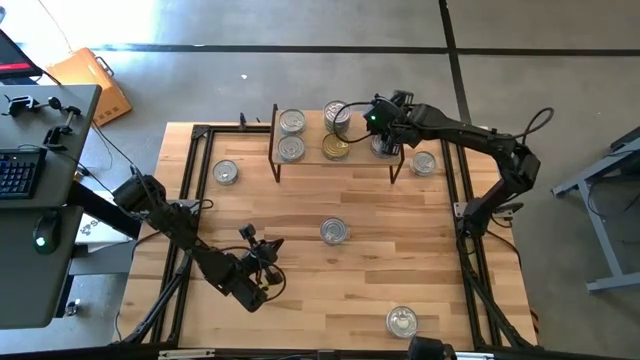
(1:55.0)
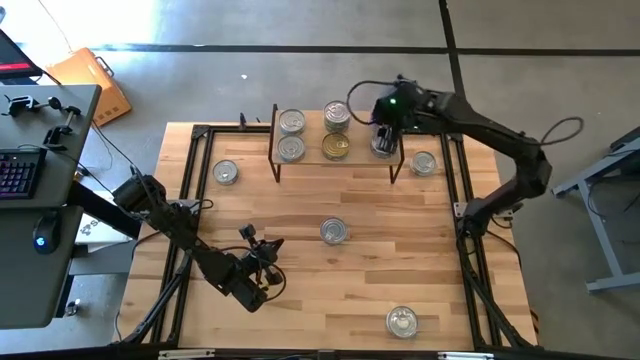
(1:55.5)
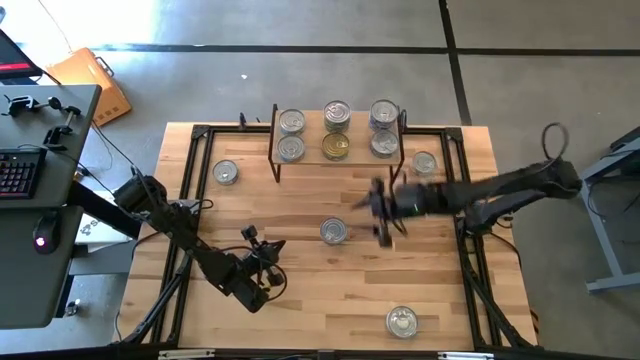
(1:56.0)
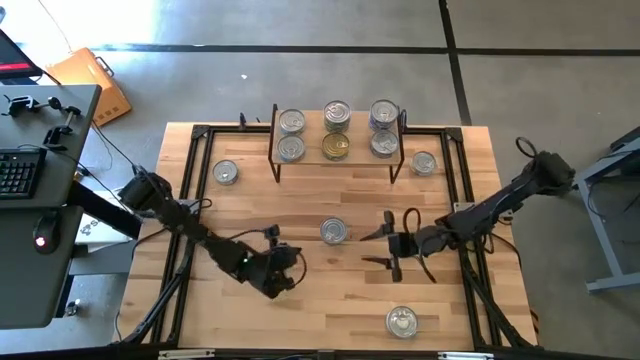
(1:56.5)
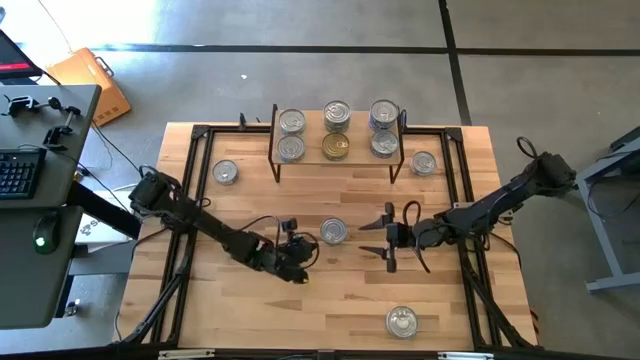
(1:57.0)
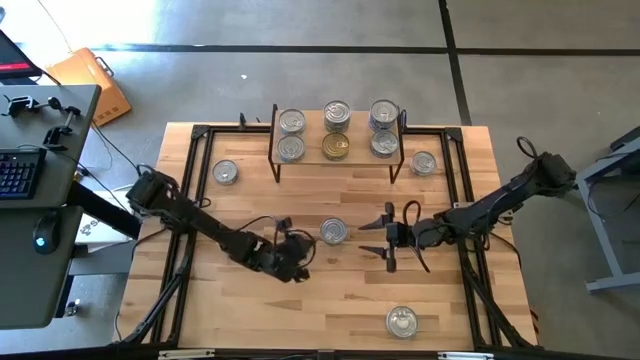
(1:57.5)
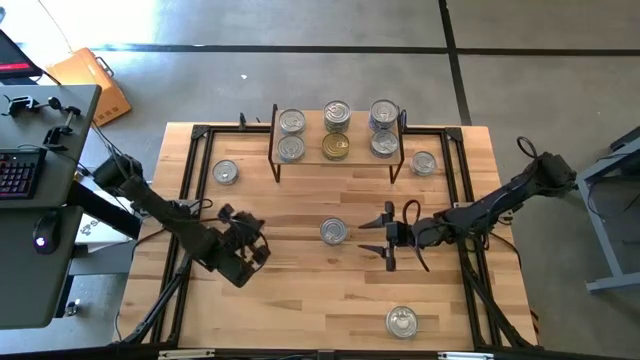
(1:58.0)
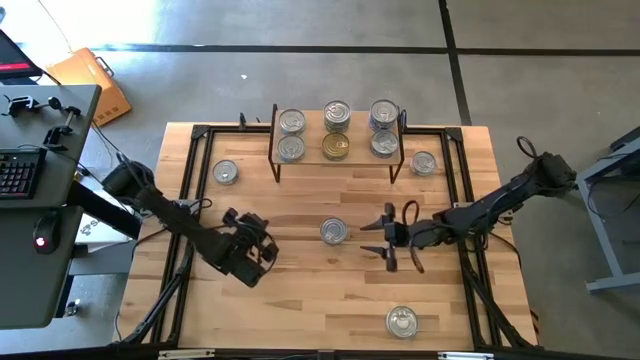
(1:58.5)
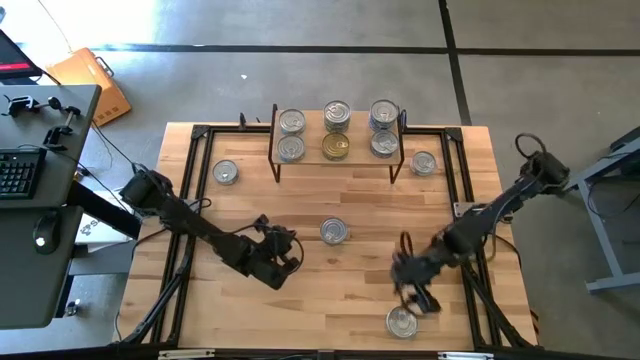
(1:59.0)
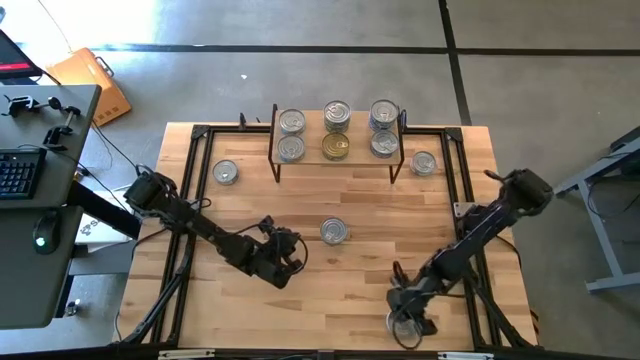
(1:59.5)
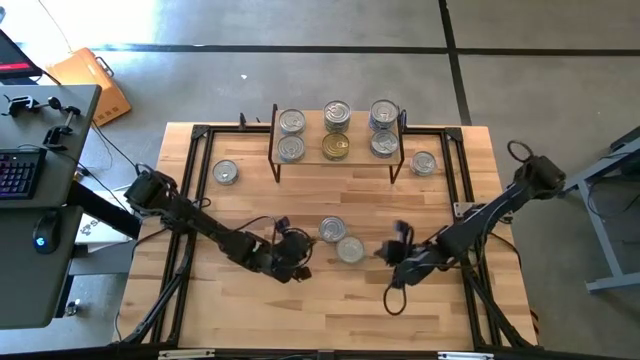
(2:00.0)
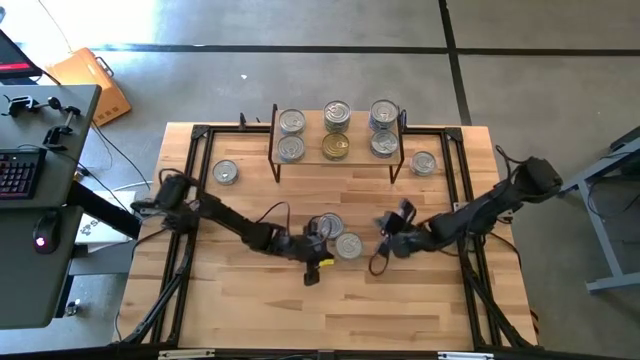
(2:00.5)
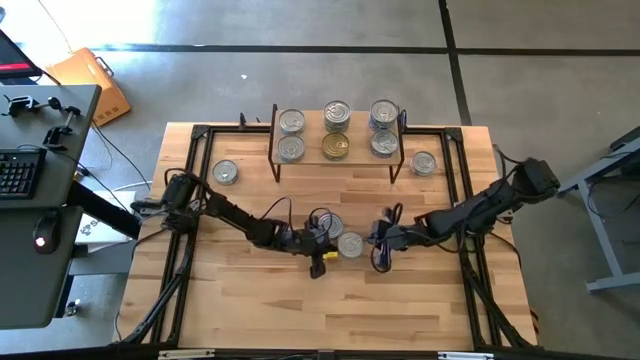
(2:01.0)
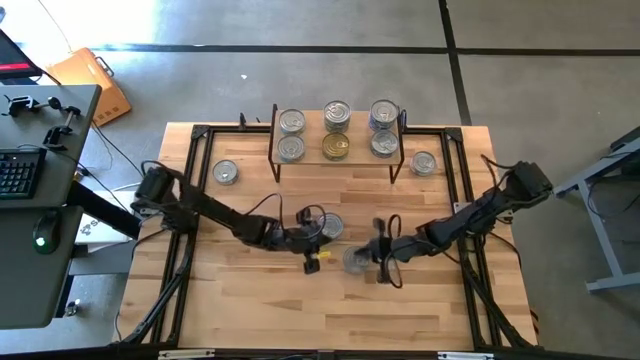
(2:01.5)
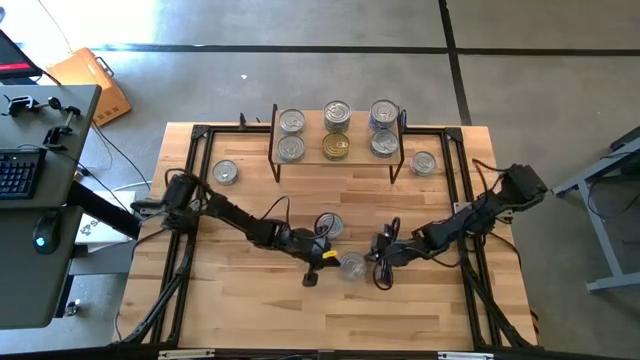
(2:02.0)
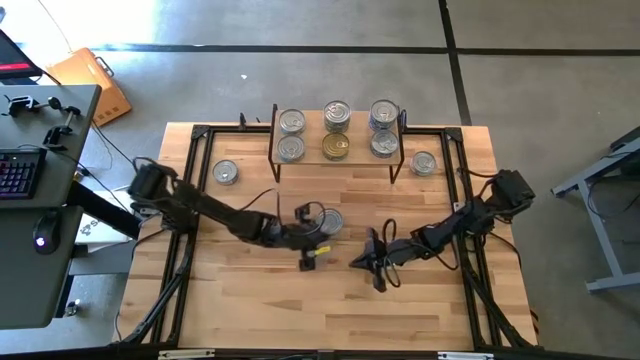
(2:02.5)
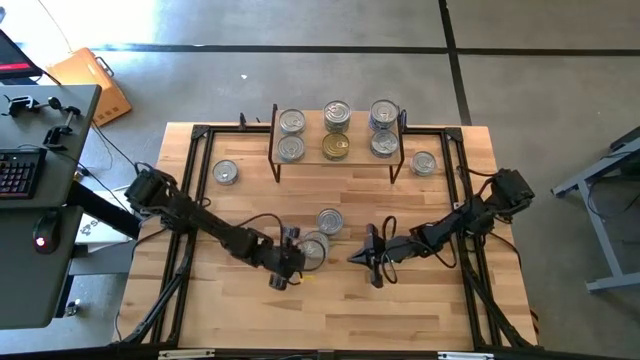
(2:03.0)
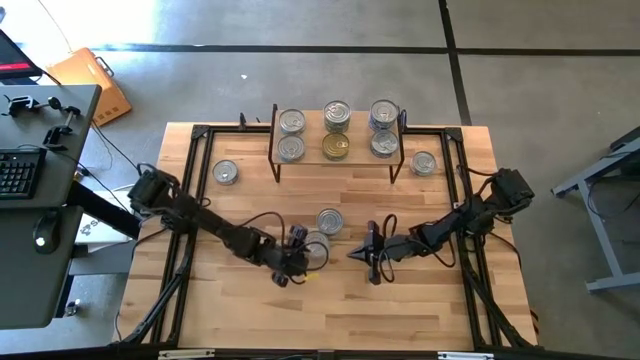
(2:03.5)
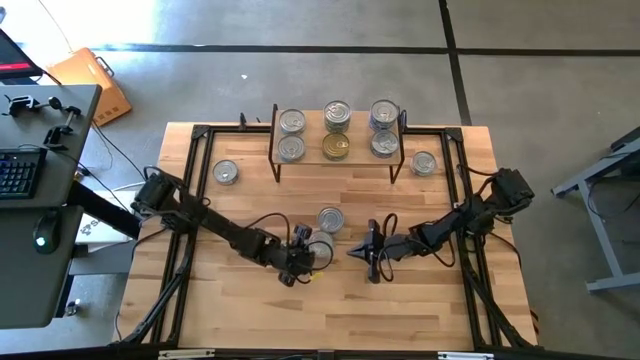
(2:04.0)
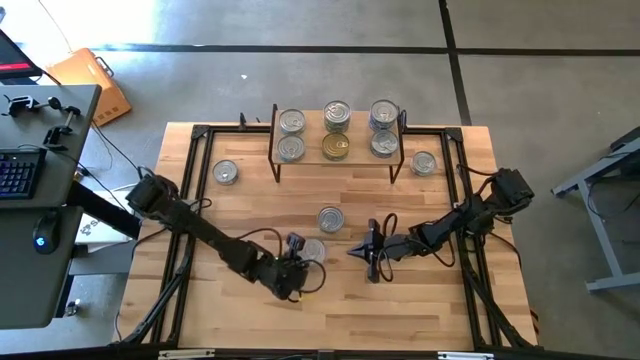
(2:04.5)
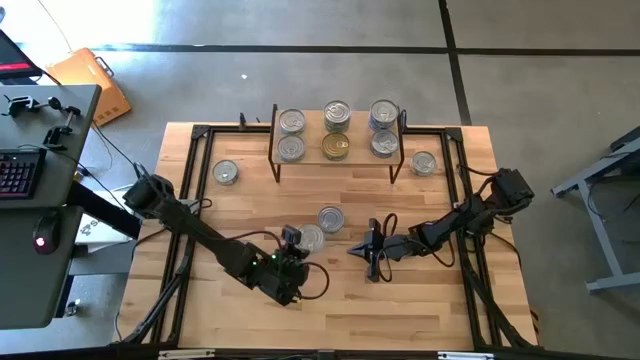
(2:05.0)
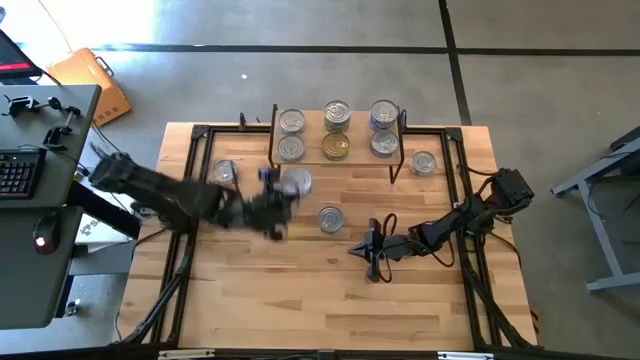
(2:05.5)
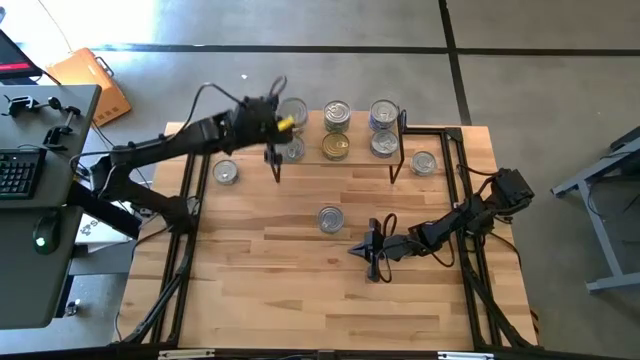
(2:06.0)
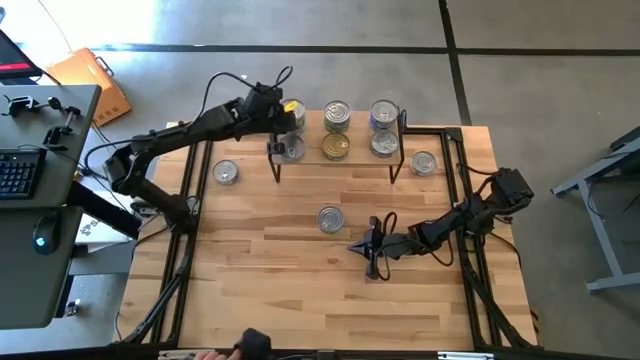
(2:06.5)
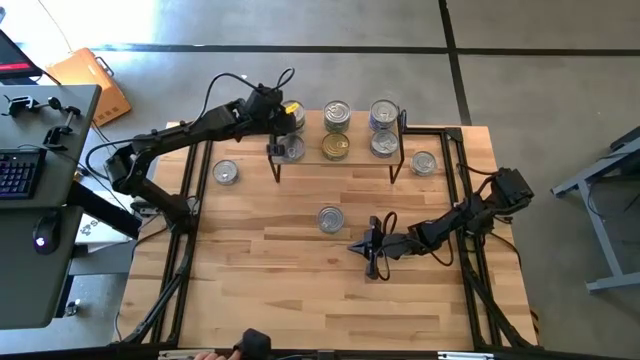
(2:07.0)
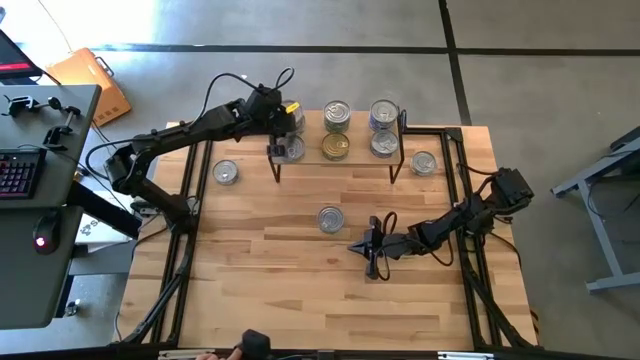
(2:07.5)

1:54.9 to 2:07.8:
Task: Stack canned seafood by type on shelf
Stack the yellow tuna can on top of the other yellow tuna can on the shelf

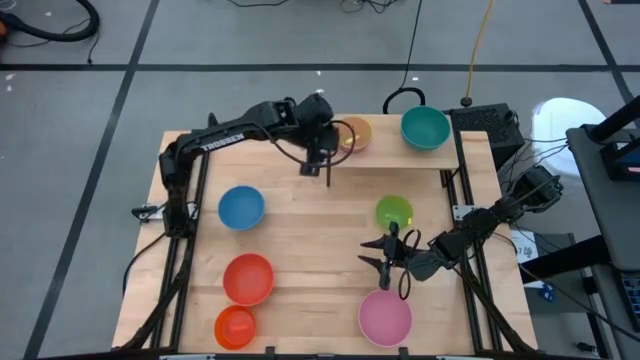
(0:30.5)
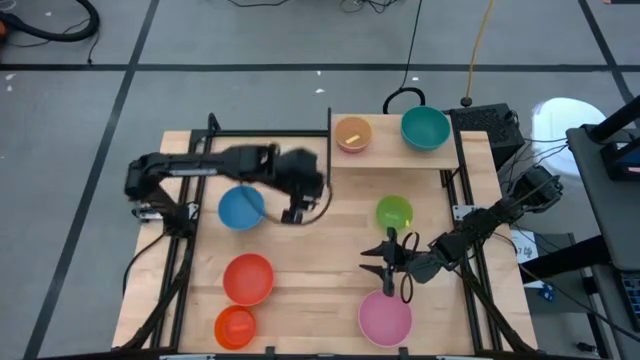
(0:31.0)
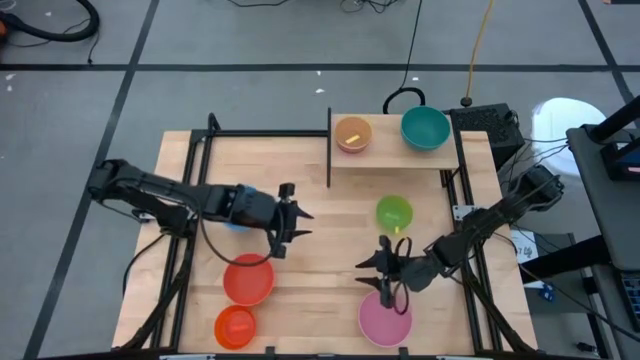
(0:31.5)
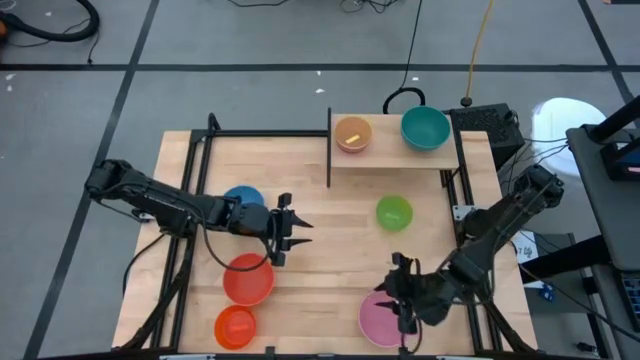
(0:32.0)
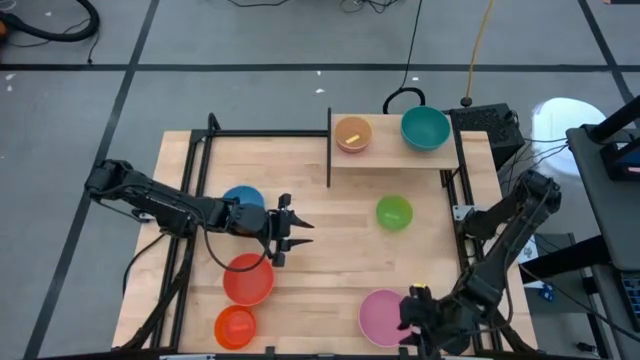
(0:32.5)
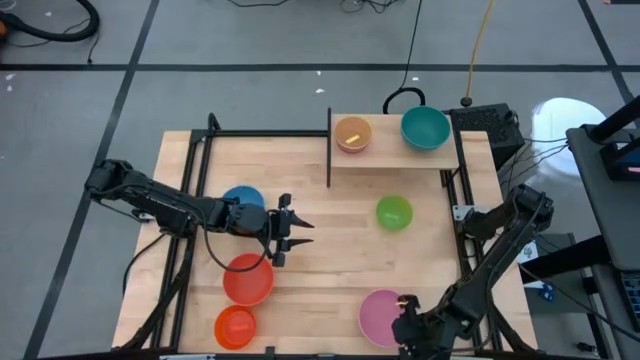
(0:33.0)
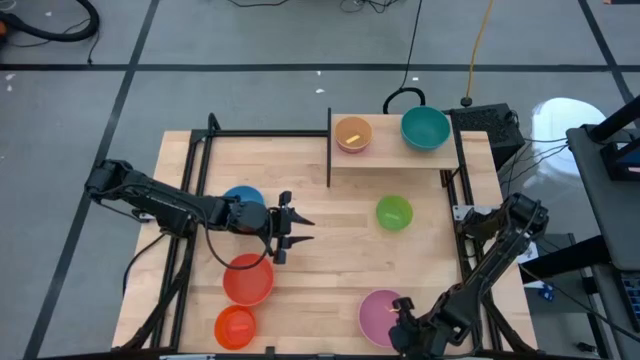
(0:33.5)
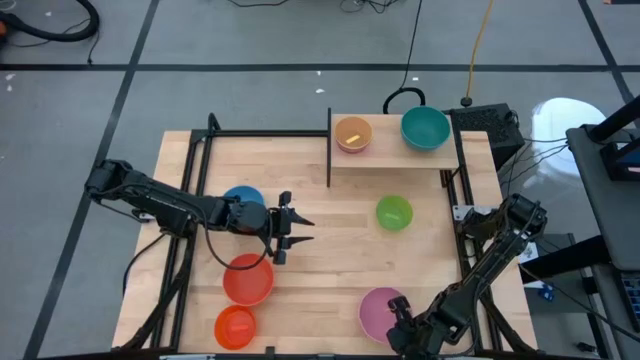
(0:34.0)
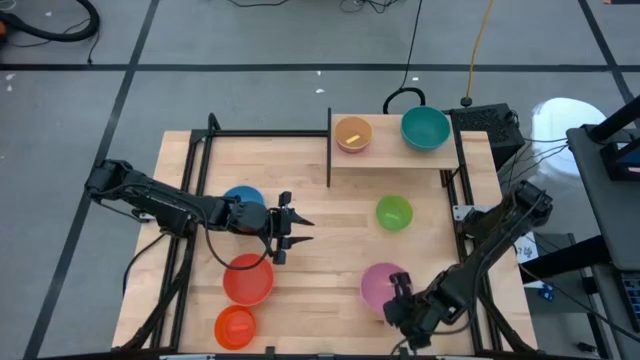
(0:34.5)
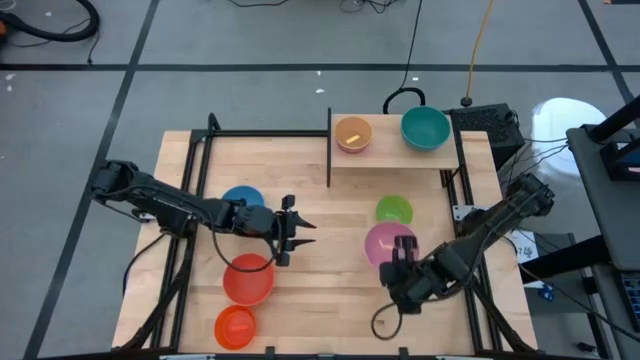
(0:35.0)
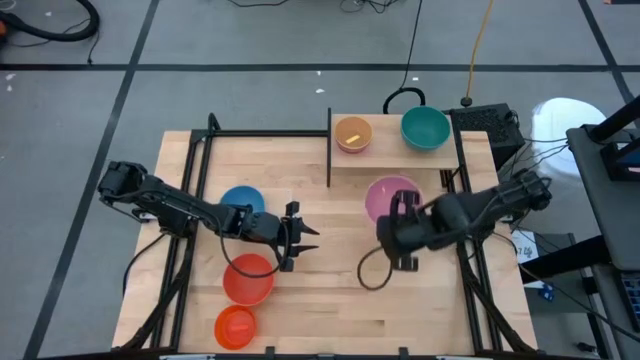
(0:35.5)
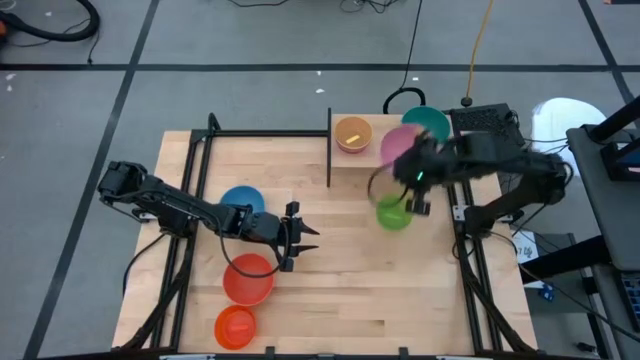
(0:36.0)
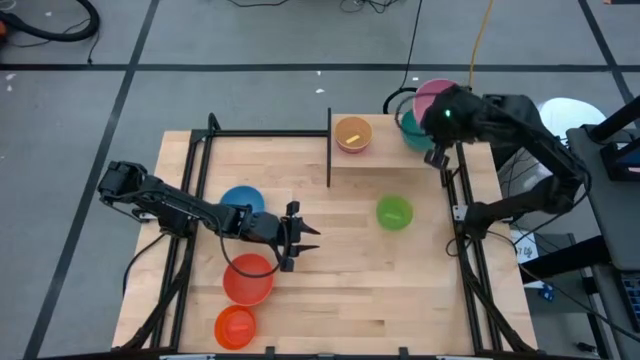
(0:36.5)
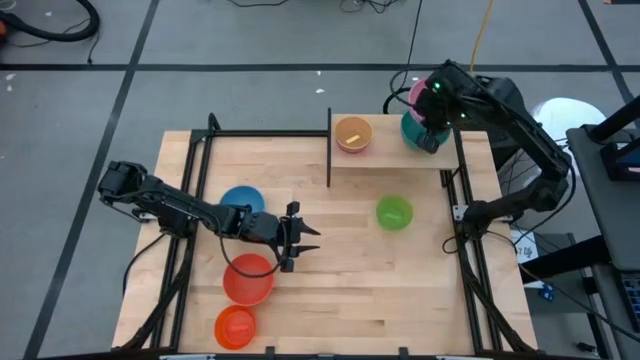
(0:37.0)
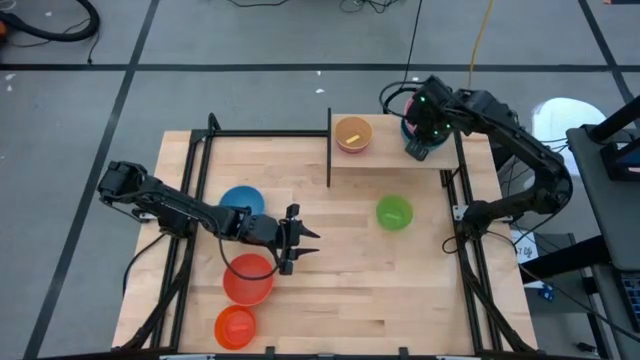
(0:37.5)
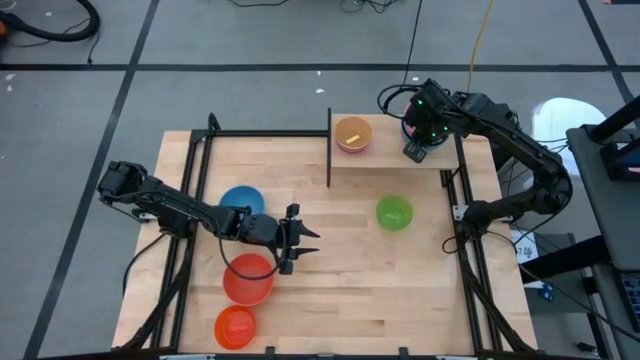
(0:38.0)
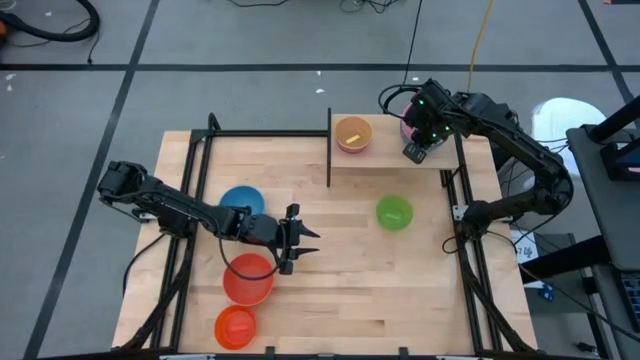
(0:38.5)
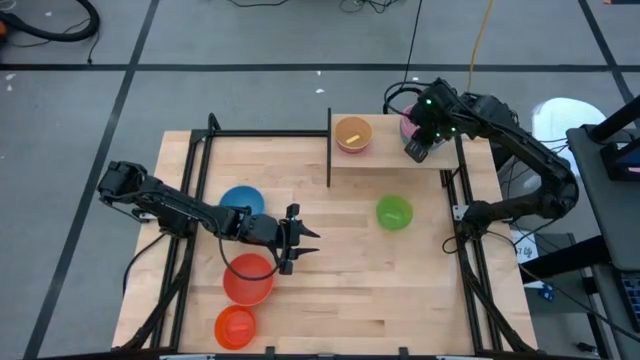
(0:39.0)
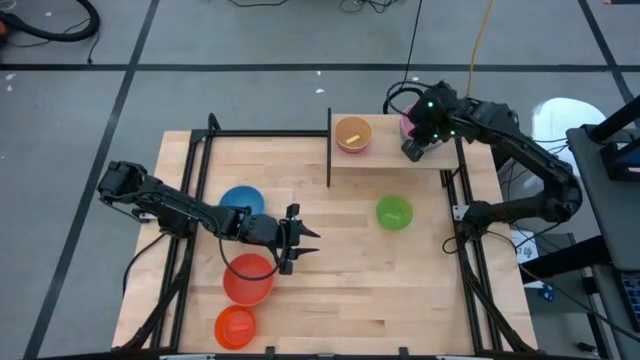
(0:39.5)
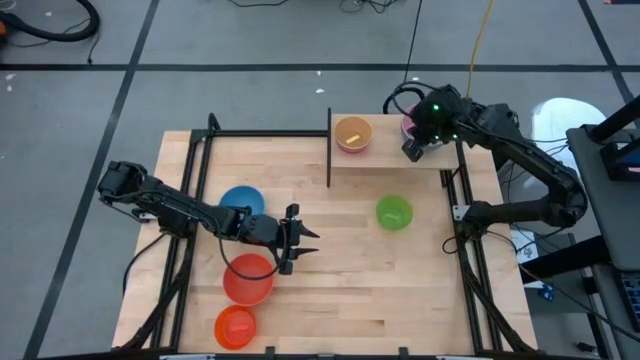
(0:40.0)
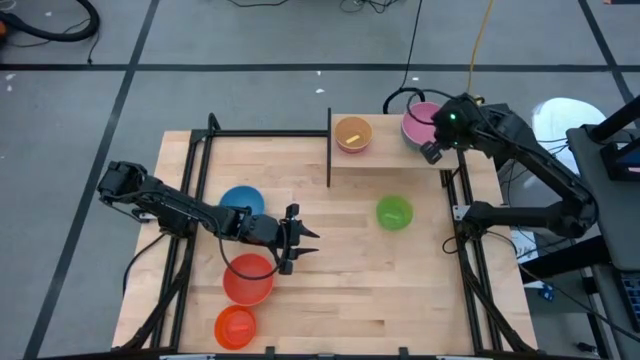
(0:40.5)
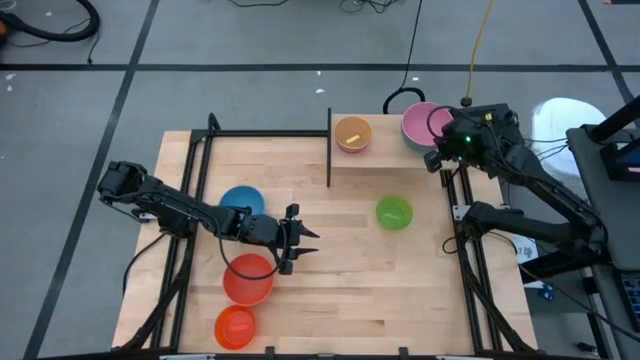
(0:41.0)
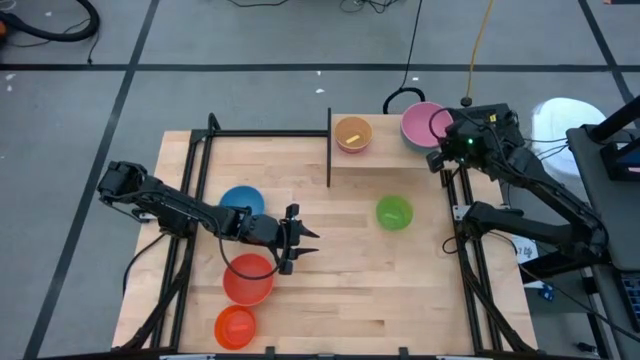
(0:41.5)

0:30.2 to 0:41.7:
Task: Place and stack bowls onto a shelf
Stack the large pink bowl on top of the large green bowl on the shelf
